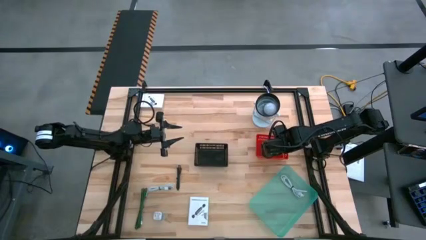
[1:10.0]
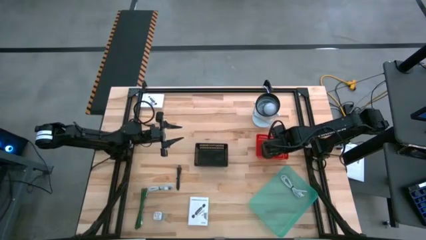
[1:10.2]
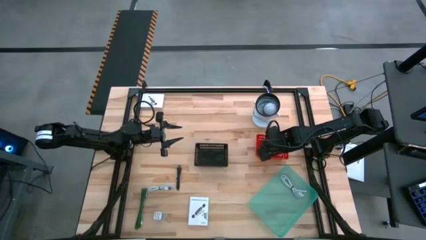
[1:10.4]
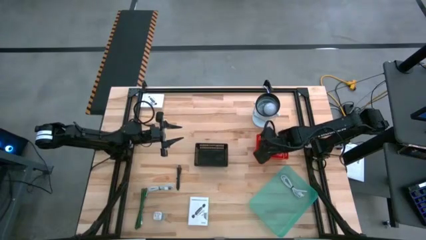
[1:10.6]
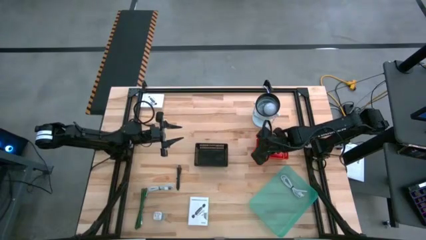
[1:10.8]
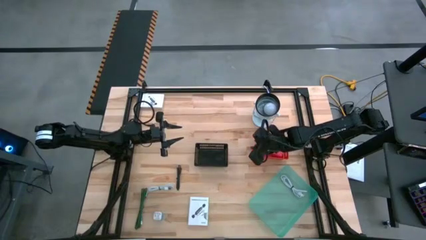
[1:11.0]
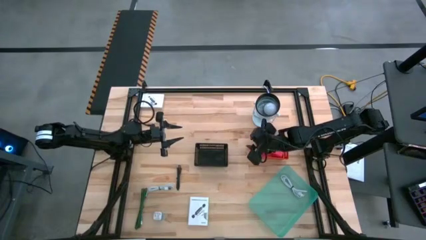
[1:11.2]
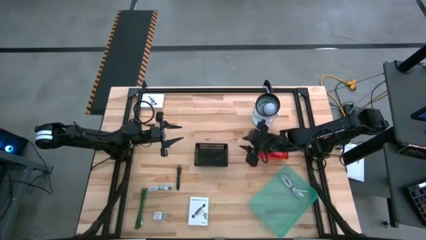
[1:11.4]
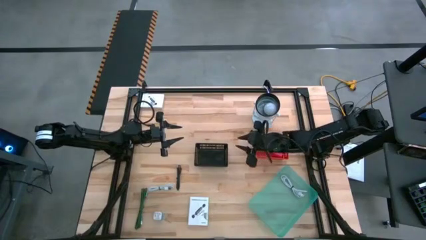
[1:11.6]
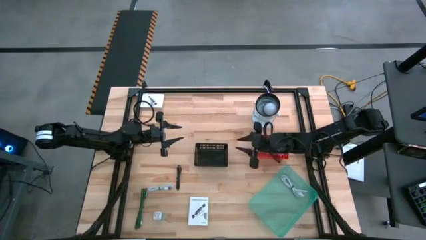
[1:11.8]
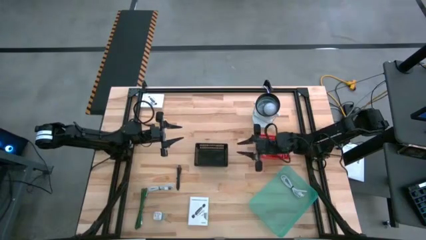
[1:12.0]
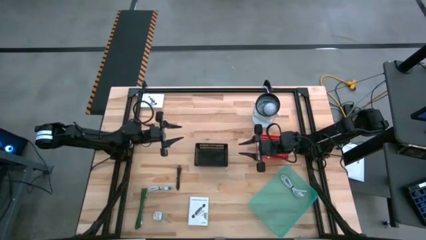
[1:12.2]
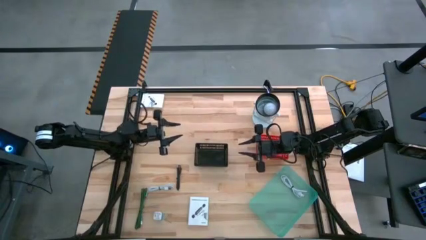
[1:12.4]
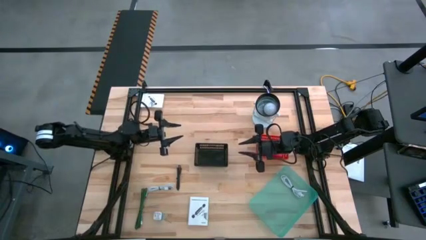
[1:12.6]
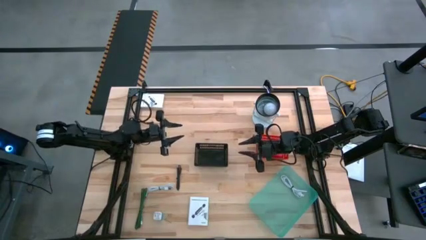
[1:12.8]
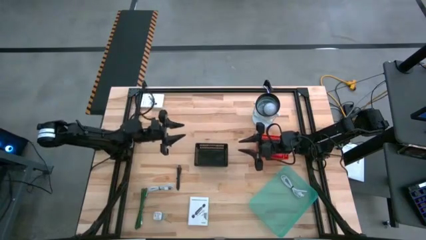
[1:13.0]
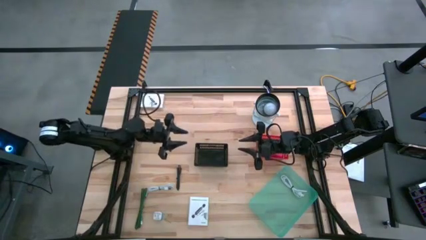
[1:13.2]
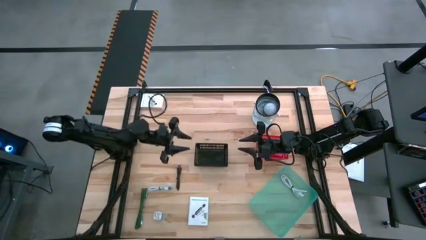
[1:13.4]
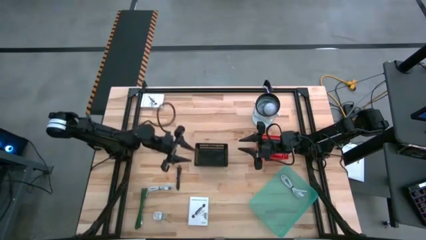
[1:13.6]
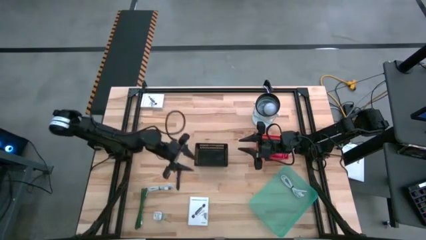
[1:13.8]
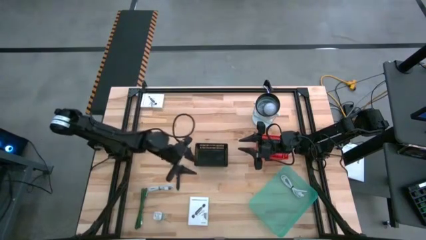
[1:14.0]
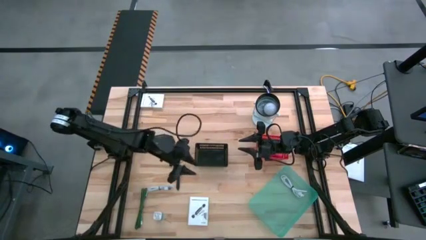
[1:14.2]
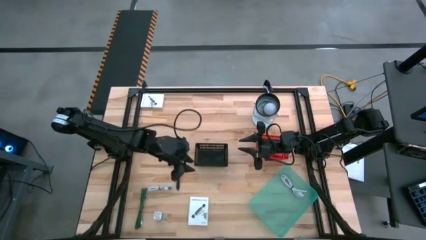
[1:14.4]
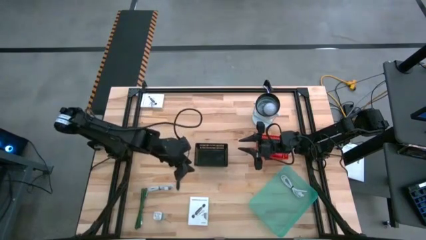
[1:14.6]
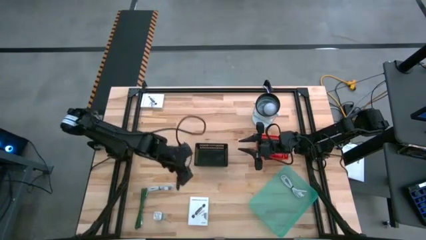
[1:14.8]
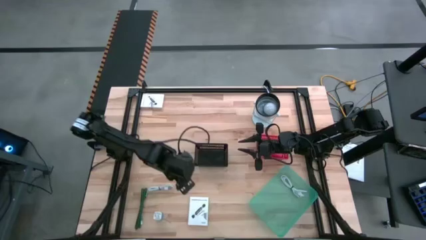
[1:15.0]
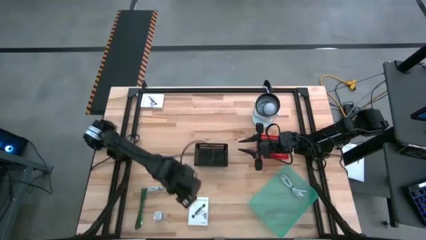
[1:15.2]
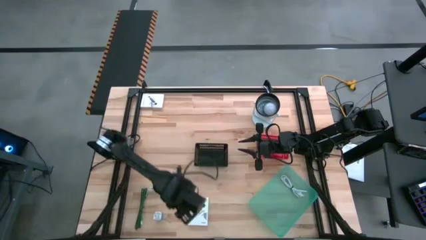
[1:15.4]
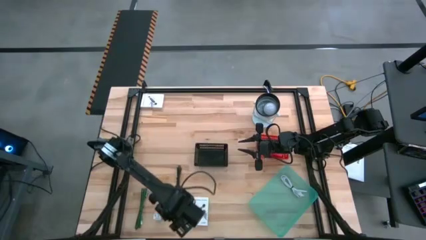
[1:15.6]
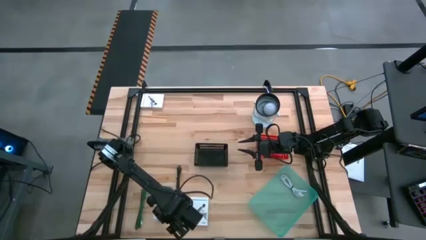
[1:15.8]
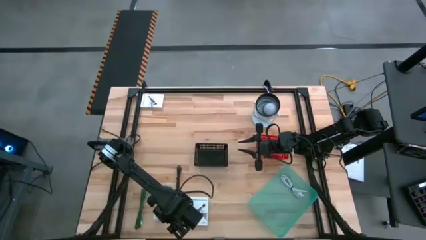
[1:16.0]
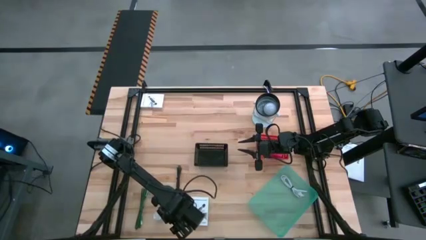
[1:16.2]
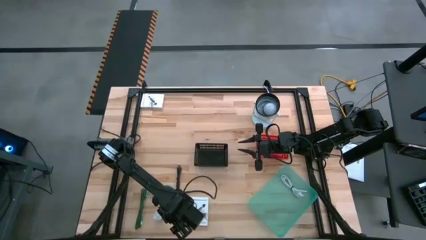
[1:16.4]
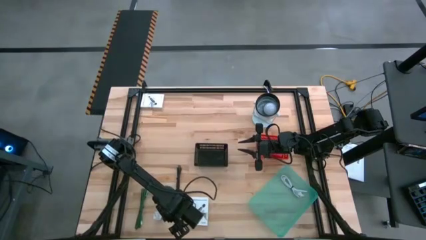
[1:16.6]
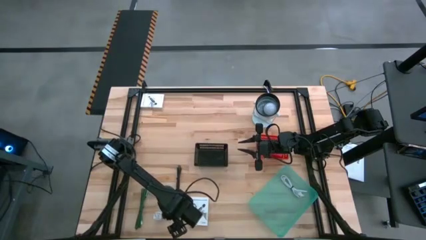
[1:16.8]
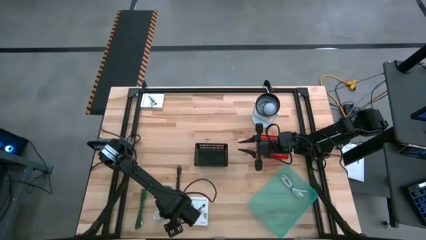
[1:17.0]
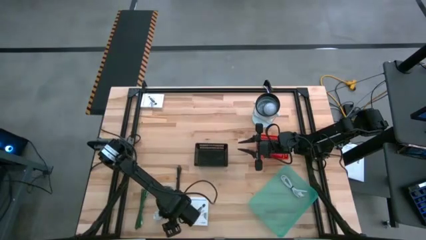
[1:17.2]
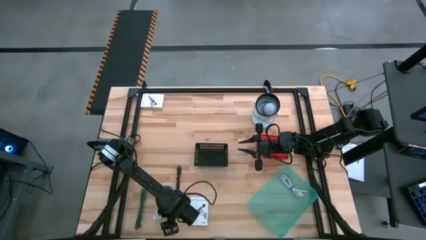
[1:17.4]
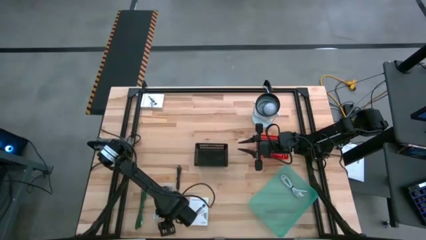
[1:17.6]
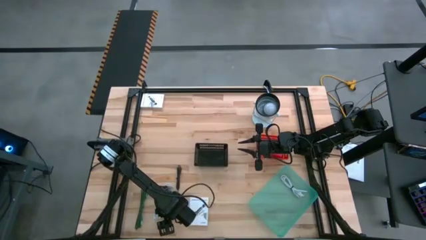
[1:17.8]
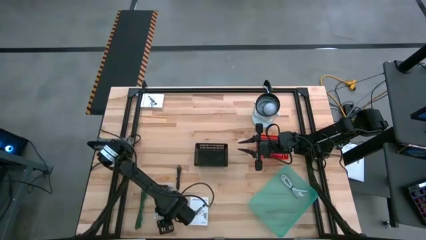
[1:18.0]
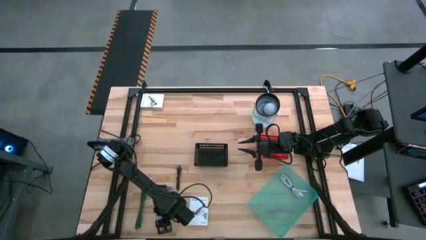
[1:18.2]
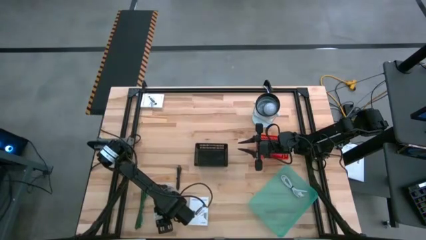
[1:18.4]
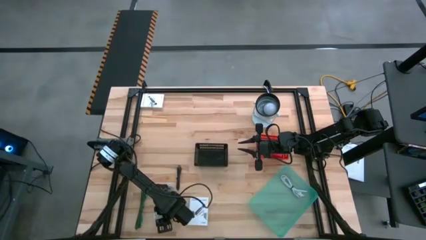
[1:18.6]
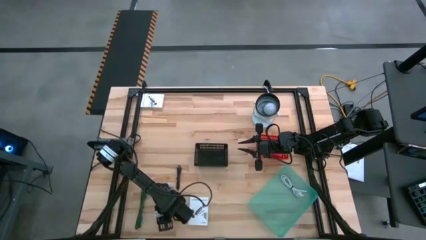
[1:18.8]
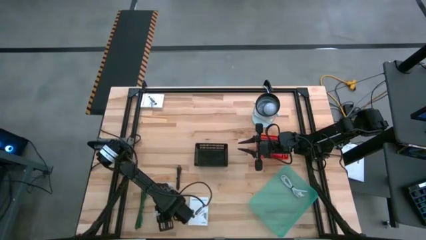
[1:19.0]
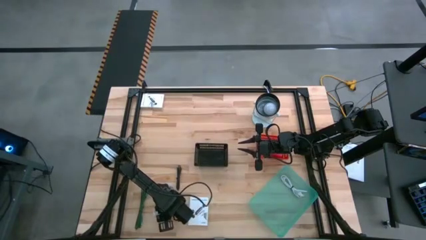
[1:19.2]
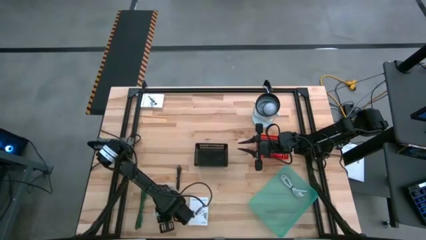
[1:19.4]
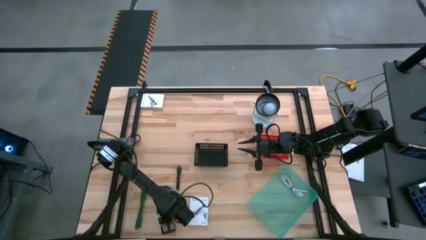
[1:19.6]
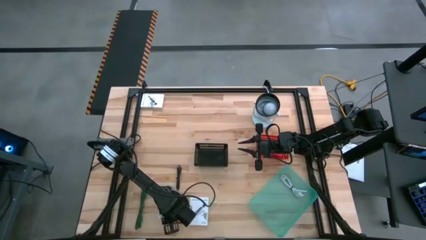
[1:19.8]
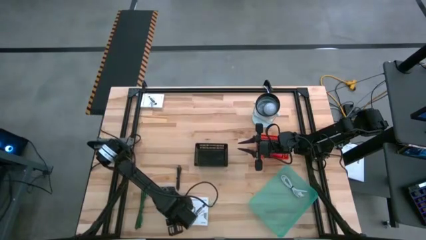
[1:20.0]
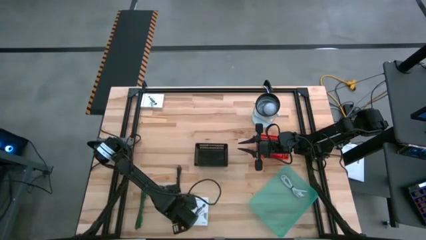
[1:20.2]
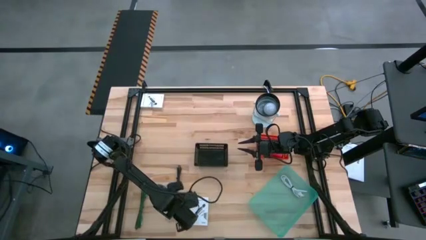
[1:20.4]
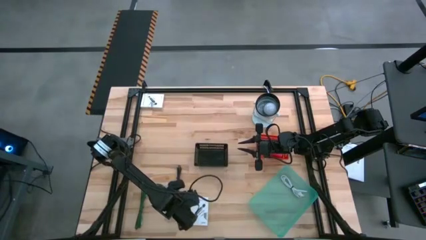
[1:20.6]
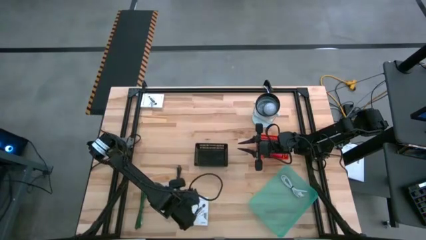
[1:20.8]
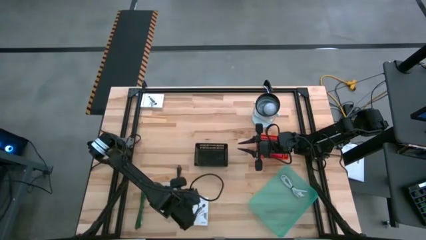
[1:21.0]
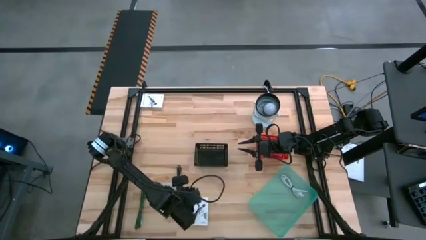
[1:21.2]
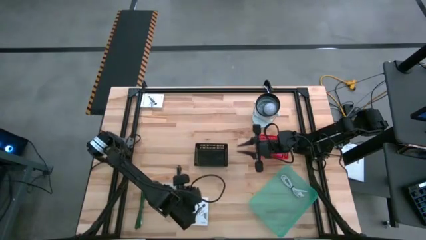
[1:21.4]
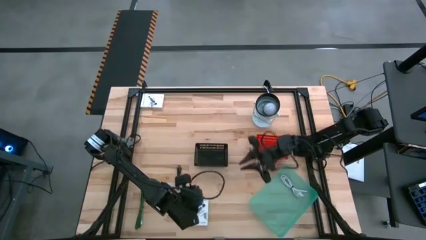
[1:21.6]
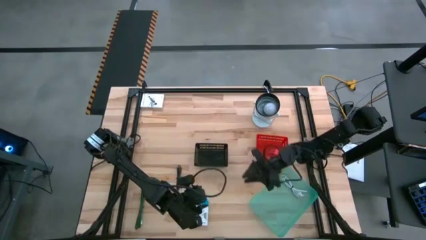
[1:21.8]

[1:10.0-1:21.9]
Task: Pick and place items into bin
Put the blue charger adapter into the red bin

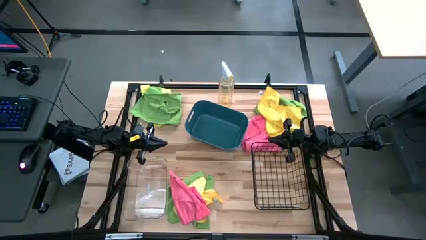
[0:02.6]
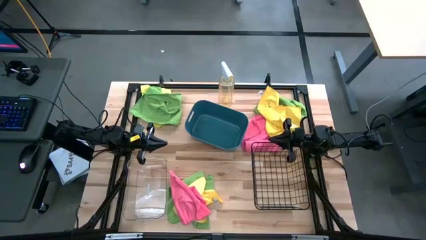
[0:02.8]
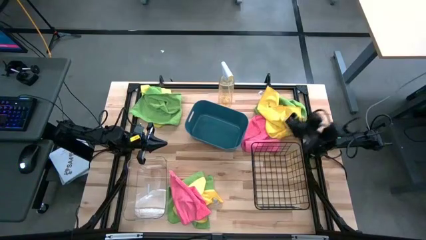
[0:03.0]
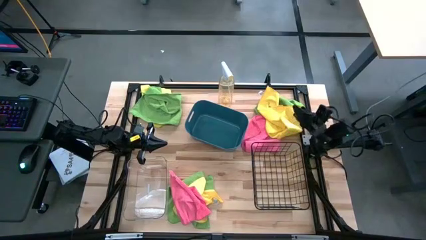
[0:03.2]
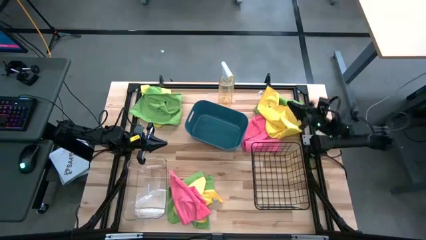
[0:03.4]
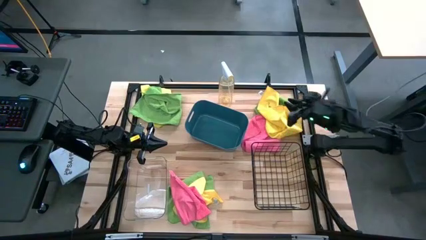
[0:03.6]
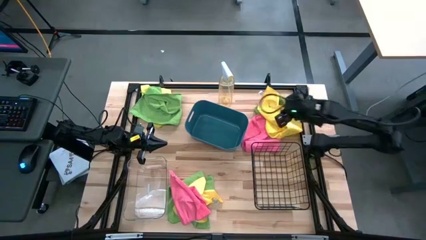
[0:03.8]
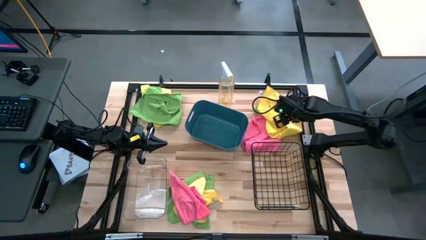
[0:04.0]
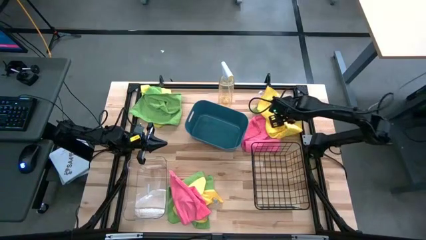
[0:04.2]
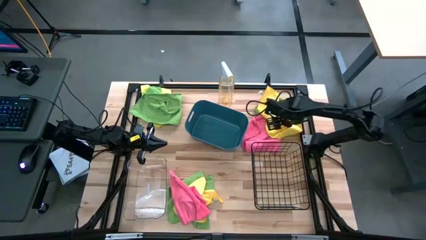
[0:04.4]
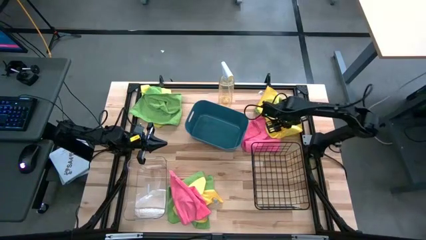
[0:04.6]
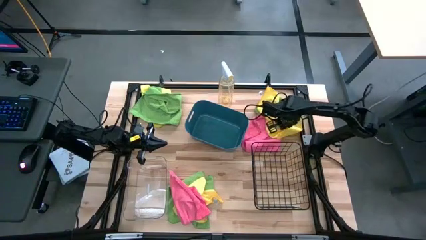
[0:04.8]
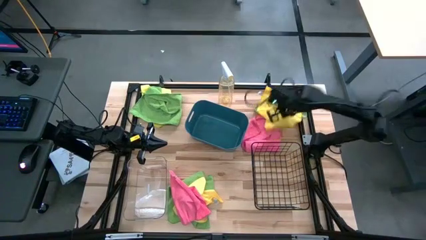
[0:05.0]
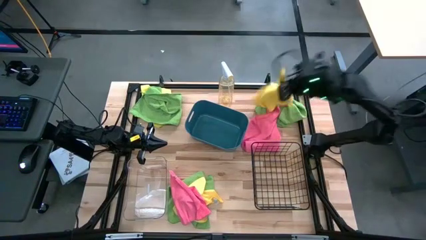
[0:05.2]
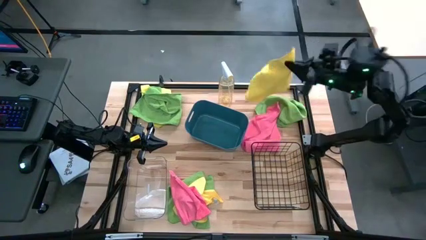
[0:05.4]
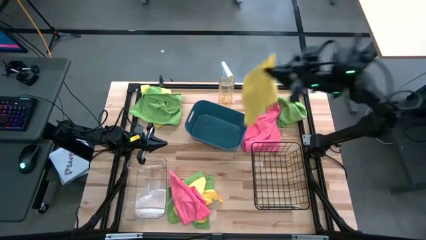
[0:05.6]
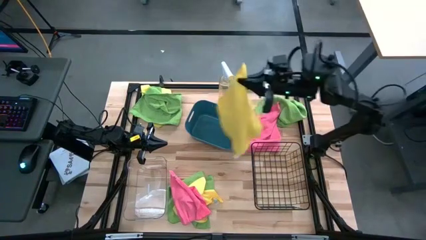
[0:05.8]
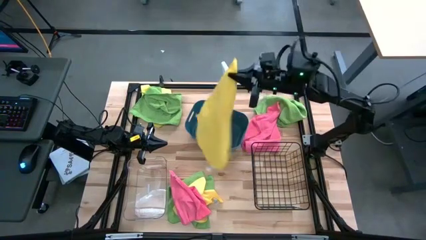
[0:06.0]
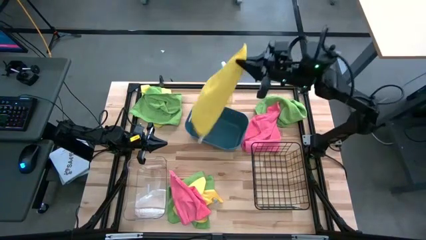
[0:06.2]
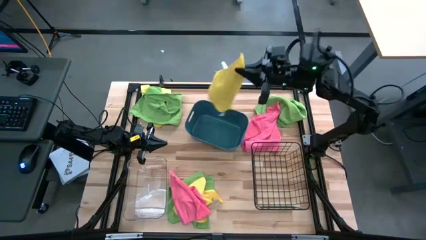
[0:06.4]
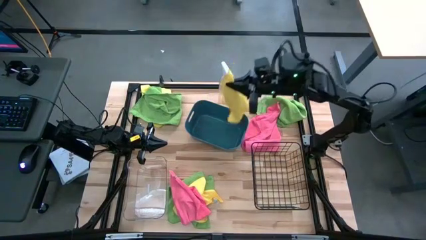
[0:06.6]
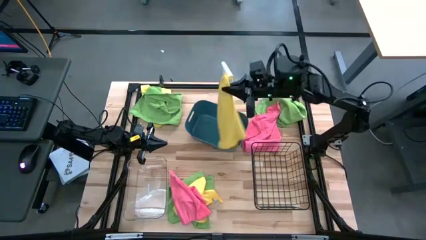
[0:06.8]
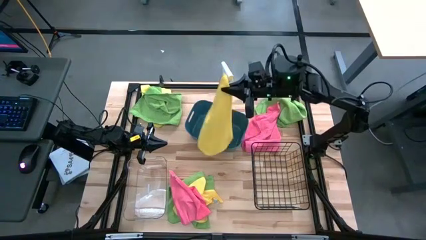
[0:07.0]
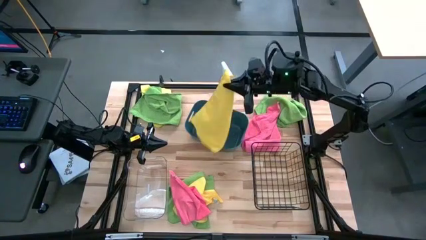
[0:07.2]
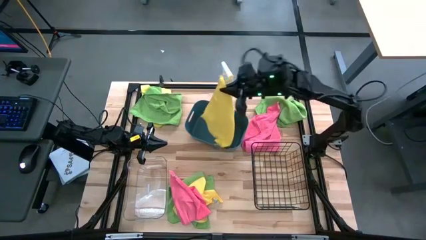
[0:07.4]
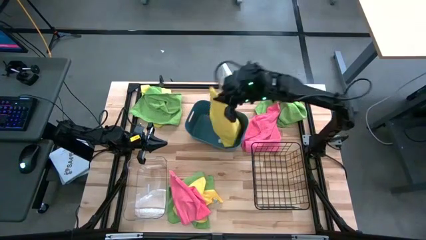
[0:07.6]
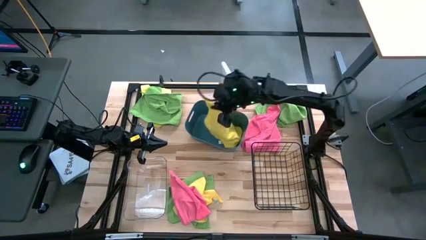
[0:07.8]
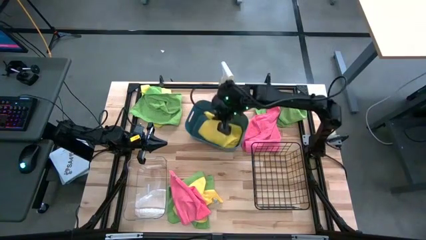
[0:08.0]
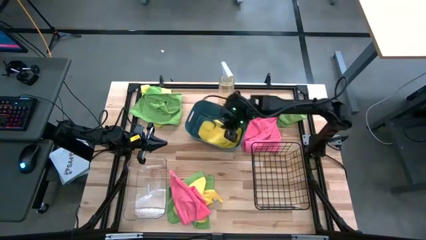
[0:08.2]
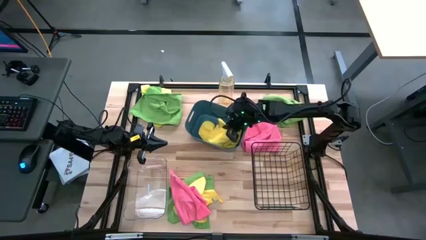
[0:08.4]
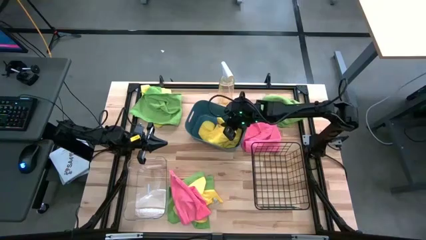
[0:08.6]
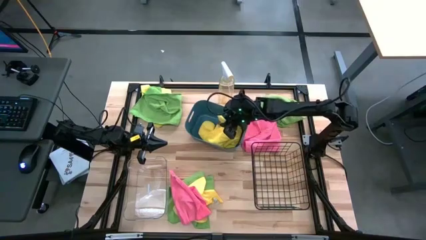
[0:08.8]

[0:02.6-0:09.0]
Task: Sort microfiber towel by color & place in baskets
Put the top right yellow microfiber cloth into the blue bin
